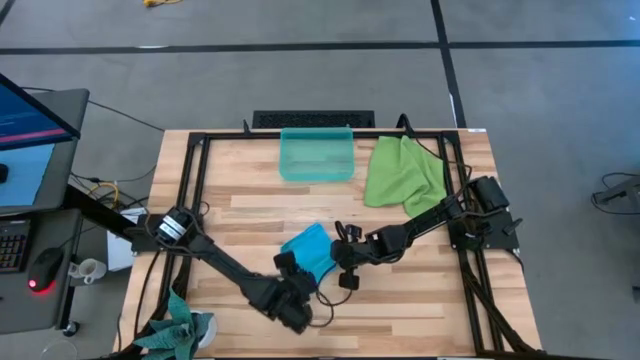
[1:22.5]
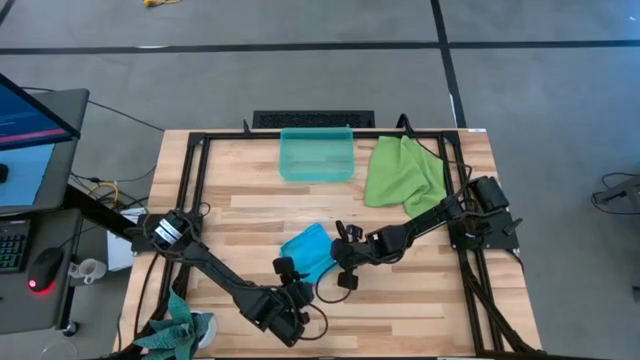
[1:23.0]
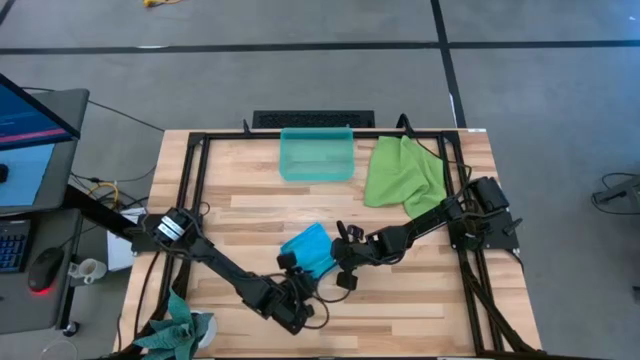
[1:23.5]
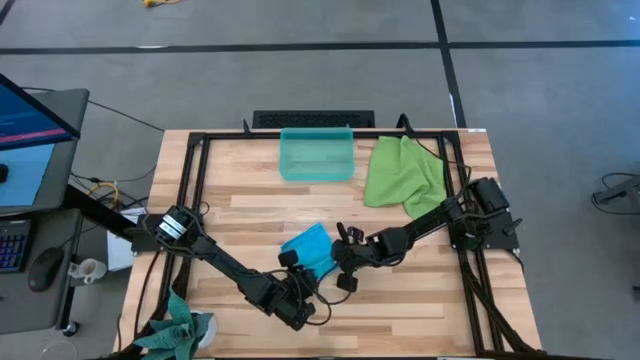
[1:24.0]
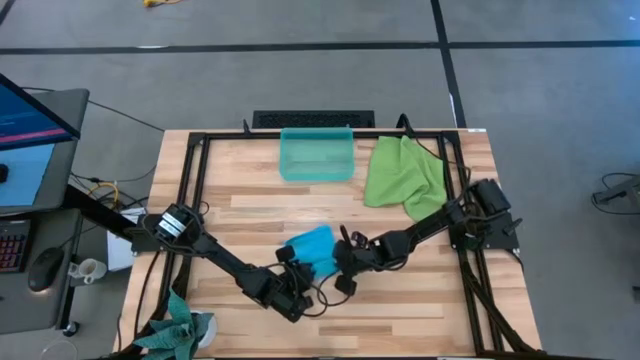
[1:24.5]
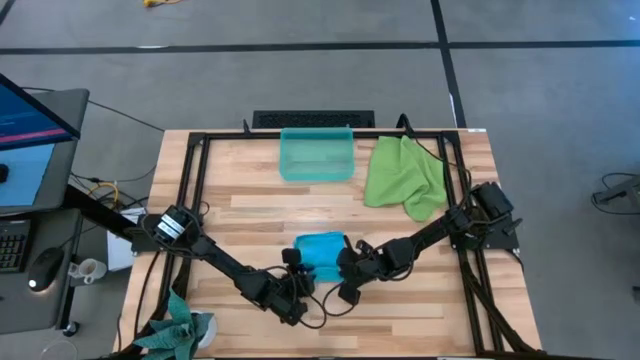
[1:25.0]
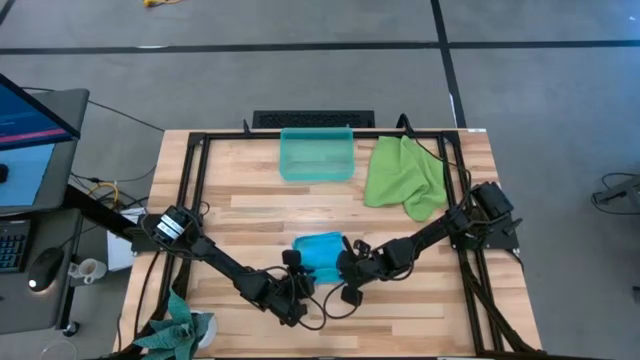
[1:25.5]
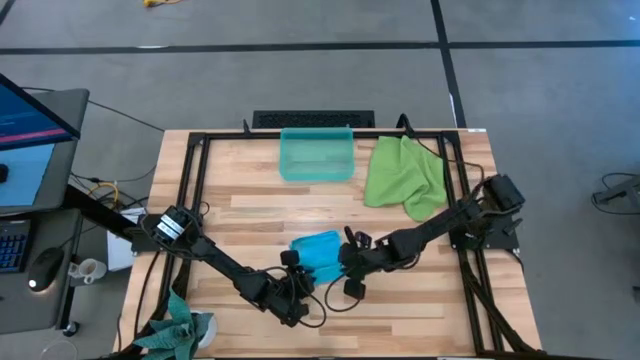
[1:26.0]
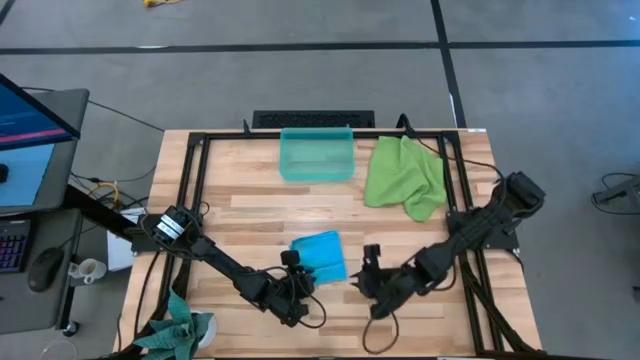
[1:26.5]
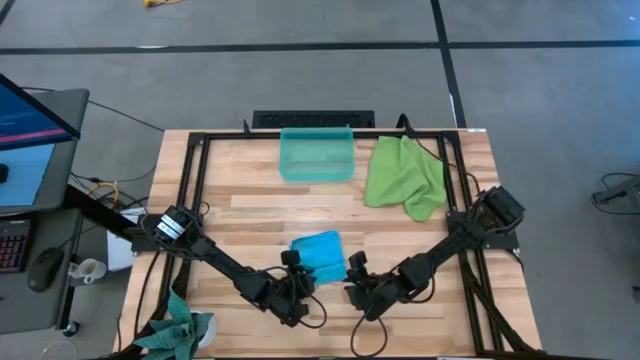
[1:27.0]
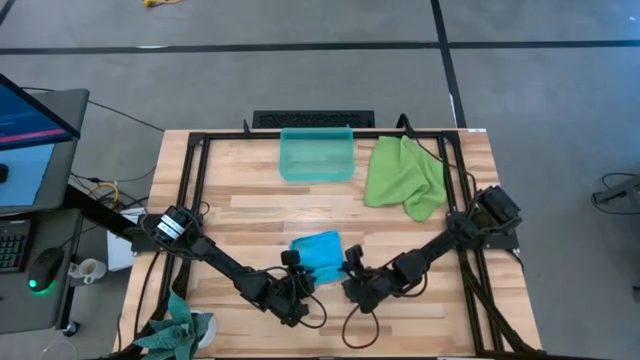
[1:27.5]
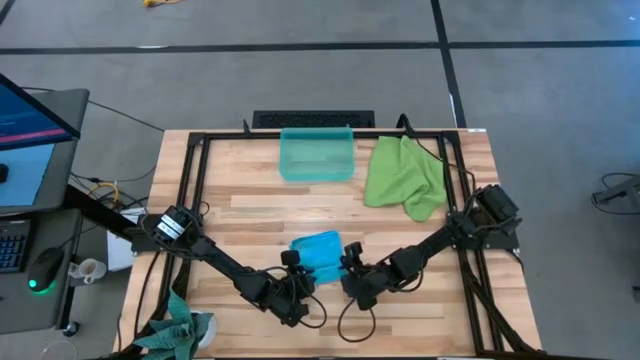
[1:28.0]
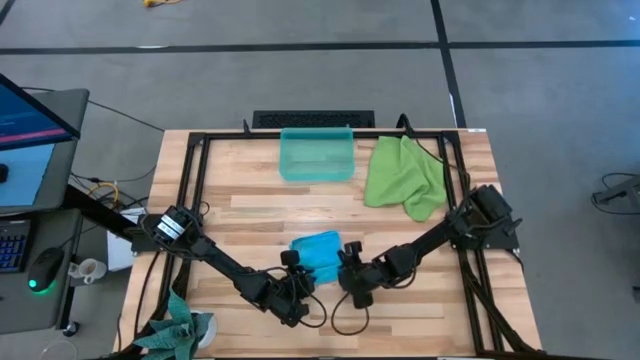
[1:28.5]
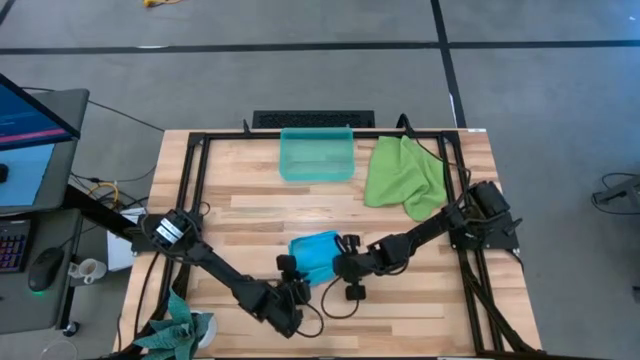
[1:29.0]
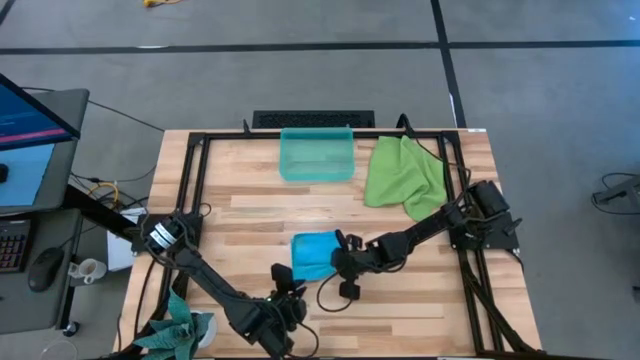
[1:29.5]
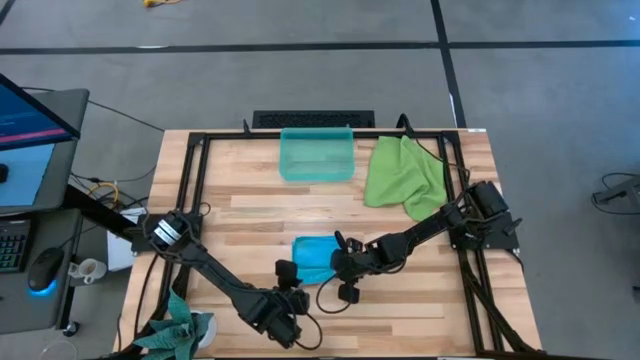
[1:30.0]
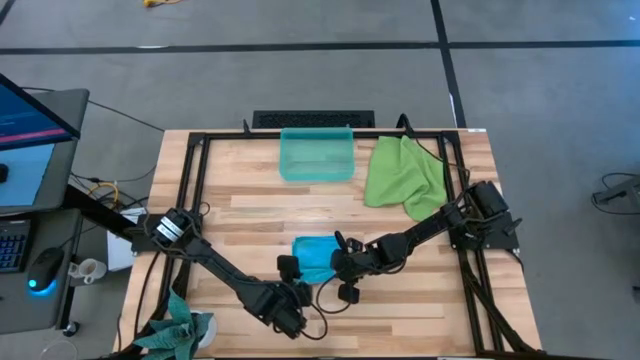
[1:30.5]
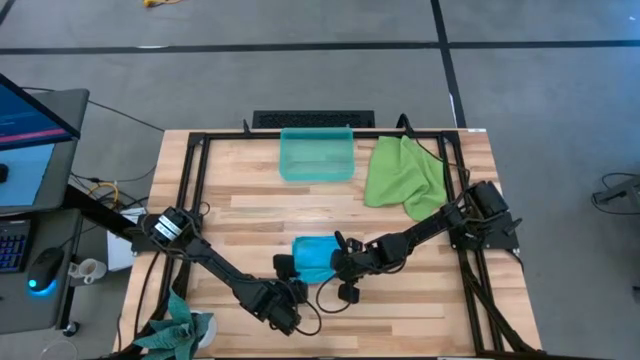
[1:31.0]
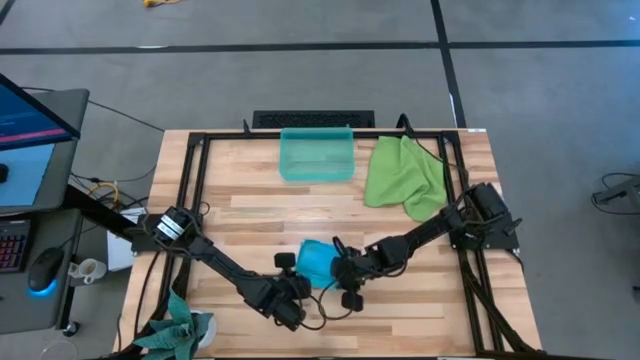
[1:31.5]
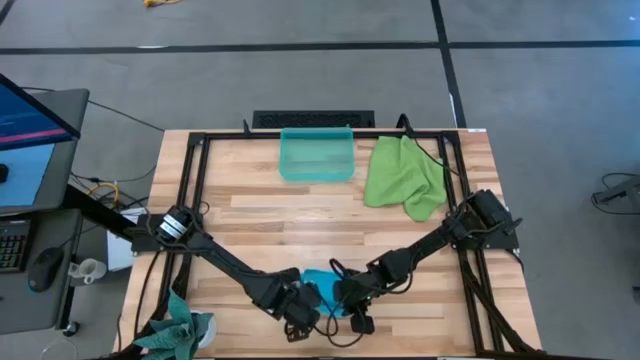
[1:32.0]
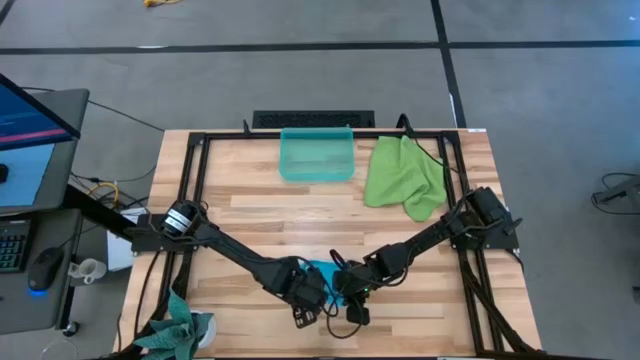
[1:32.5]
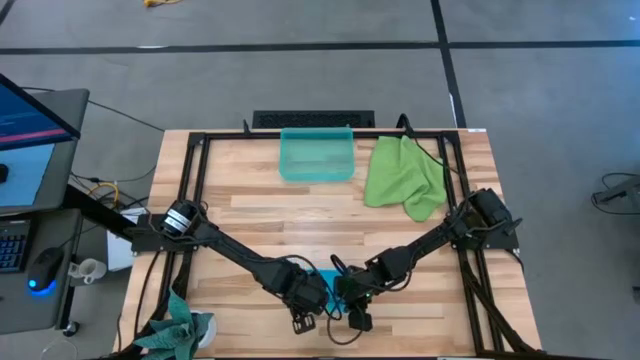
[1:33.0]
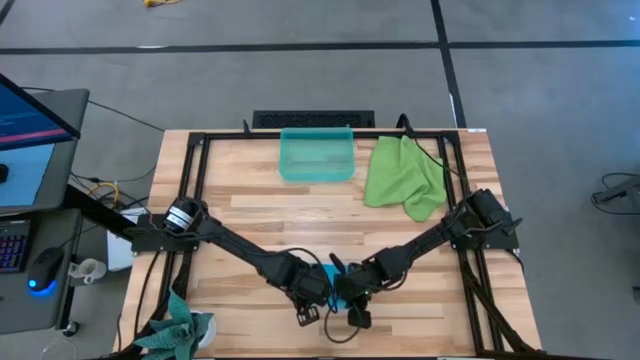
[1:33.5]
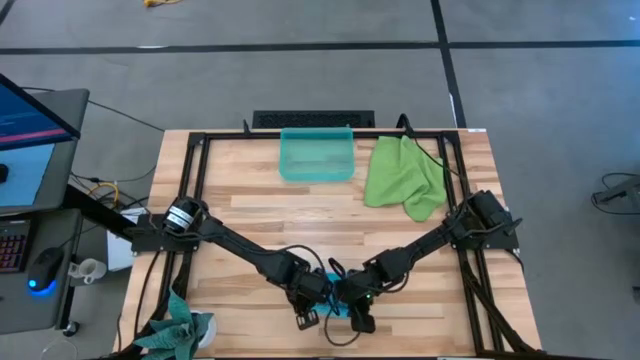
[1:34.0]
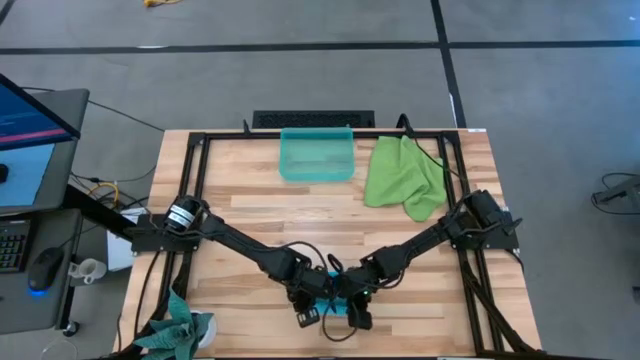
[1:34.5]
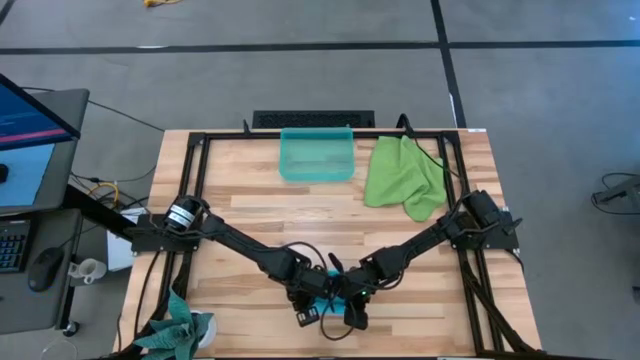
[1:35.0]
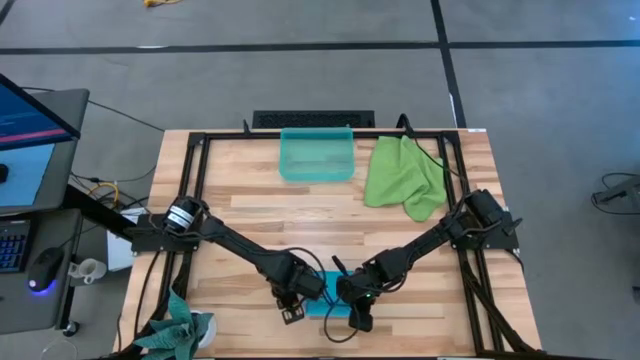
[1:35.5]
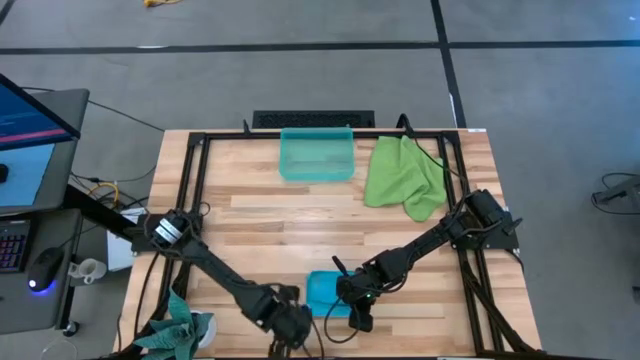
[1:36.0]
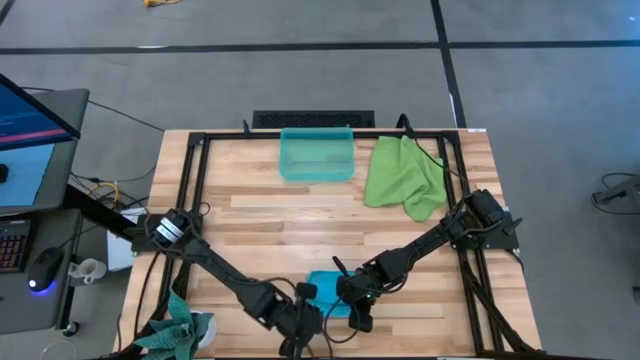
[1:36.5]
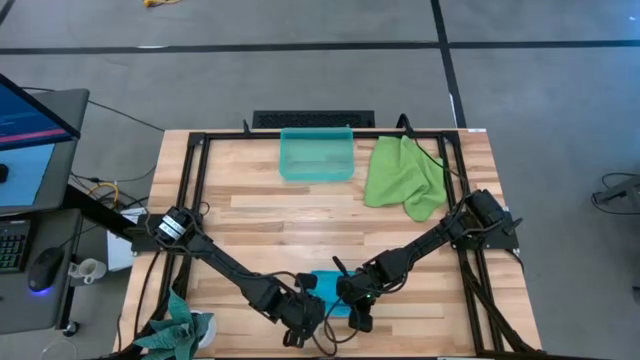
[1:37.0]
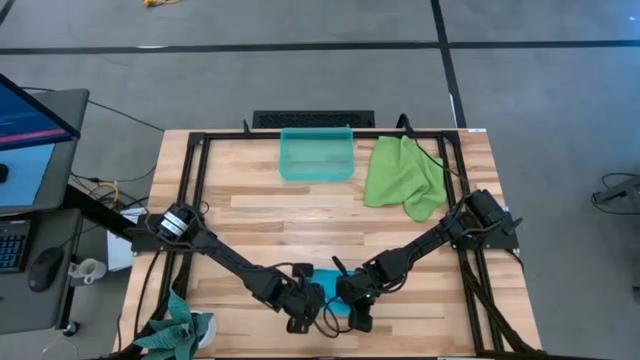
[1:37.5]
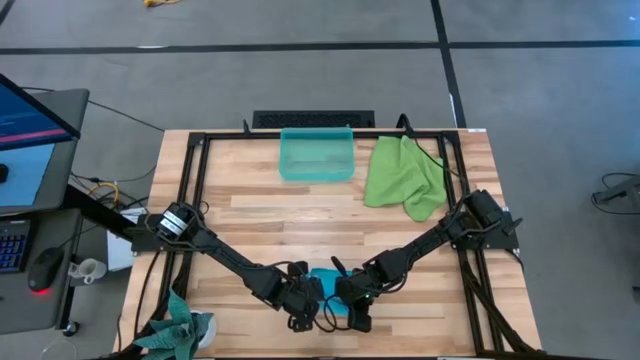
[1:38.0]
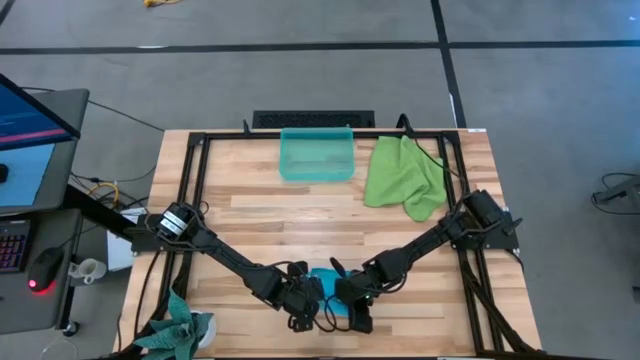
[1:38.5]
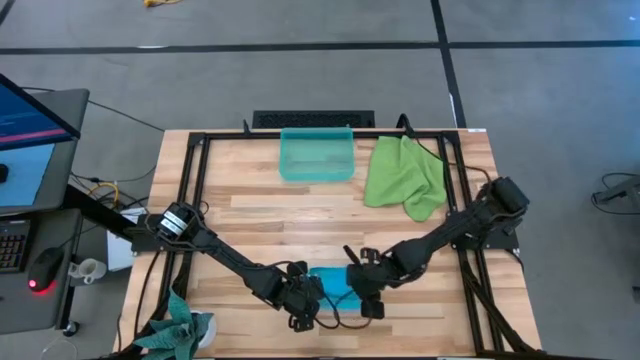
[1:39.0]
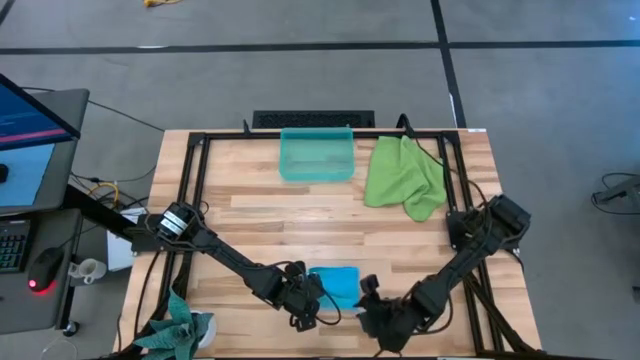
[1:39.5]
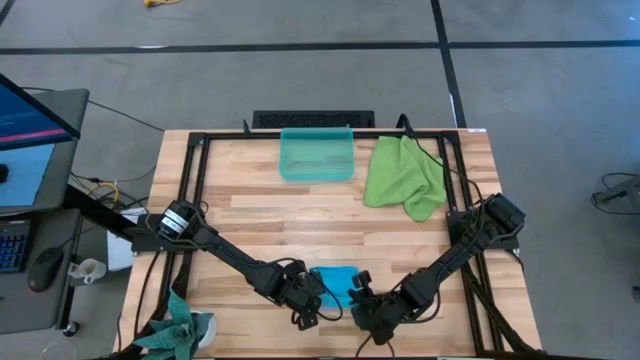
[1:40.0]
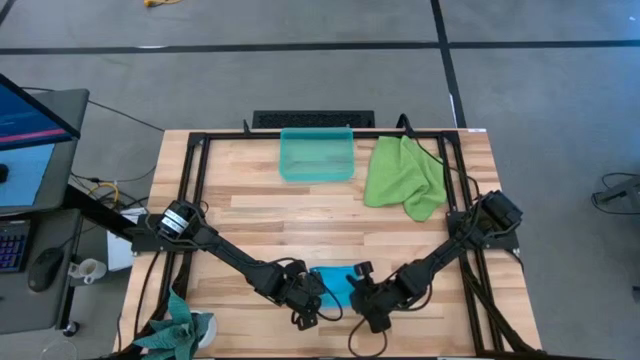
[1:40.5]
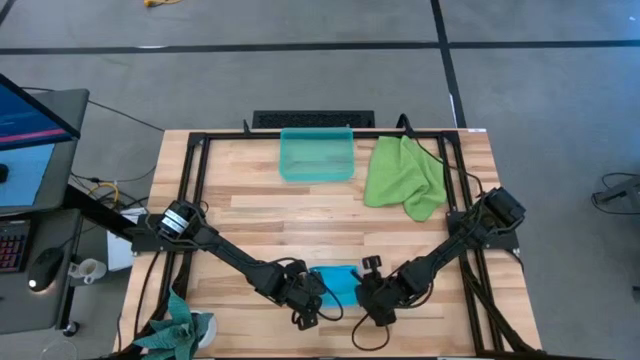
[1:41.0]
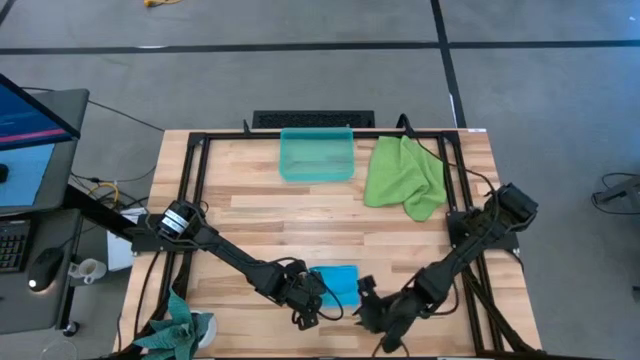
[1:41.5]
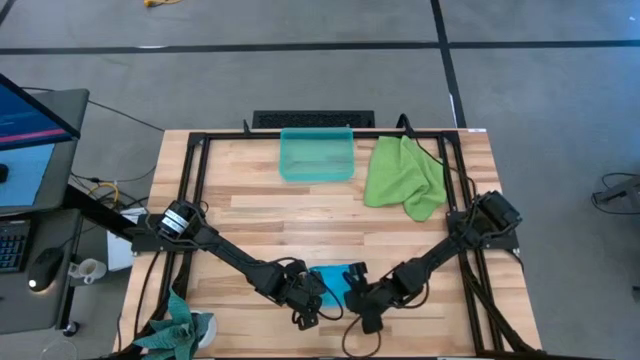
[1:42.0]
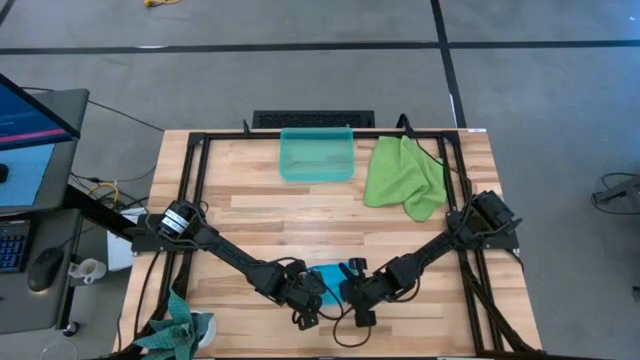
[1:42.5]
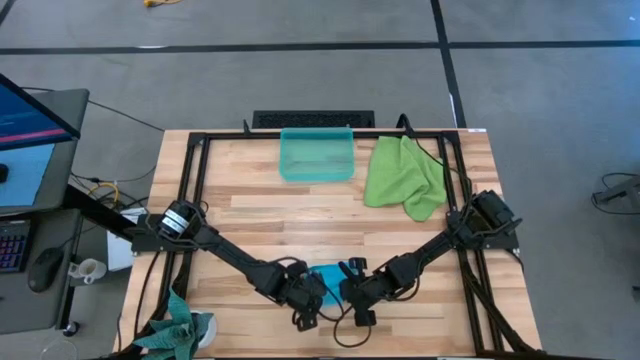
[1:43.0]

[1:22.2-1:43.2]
Task: Roll microfiber towels into tight, uniform cylinder then place into a basket
Roll the blue microfiber cloth
